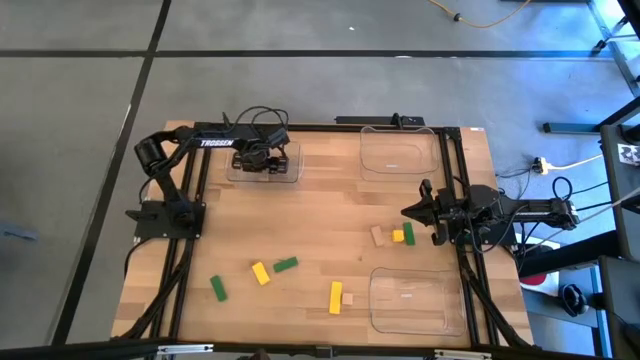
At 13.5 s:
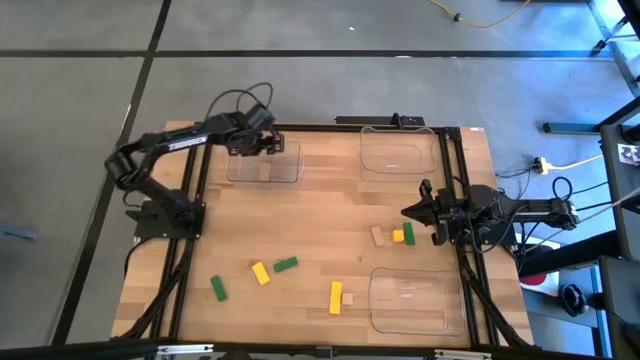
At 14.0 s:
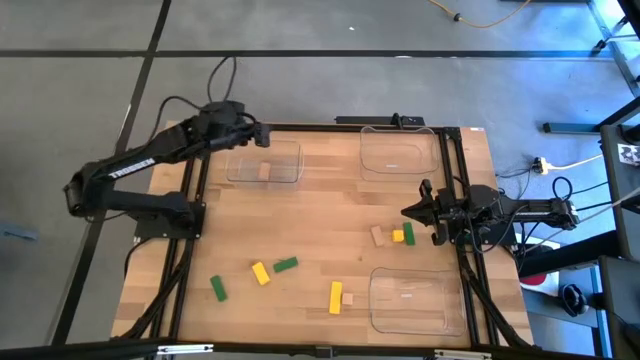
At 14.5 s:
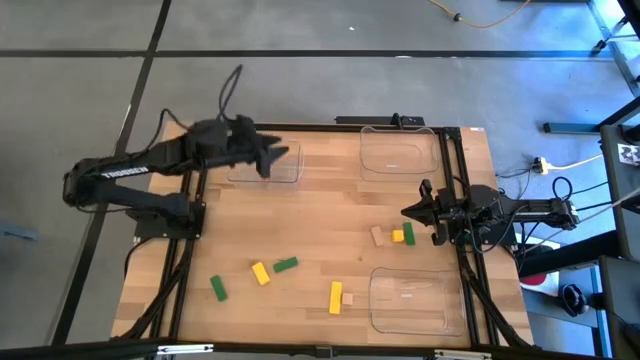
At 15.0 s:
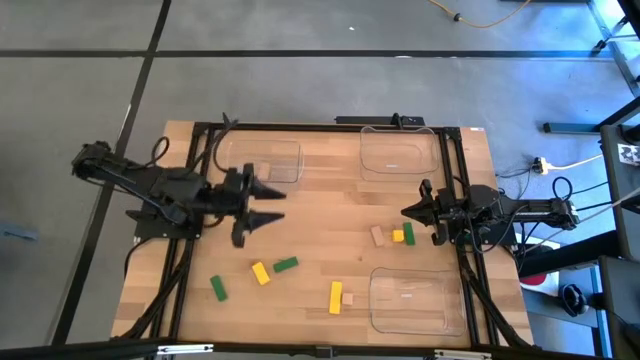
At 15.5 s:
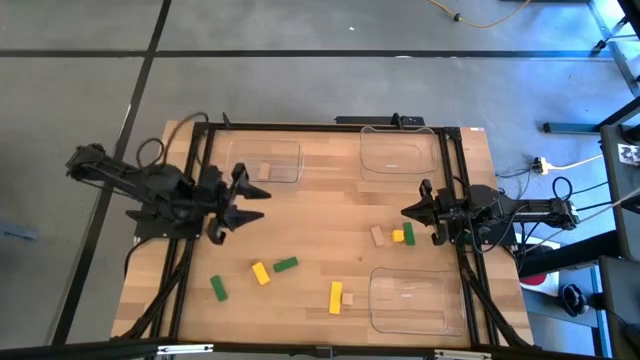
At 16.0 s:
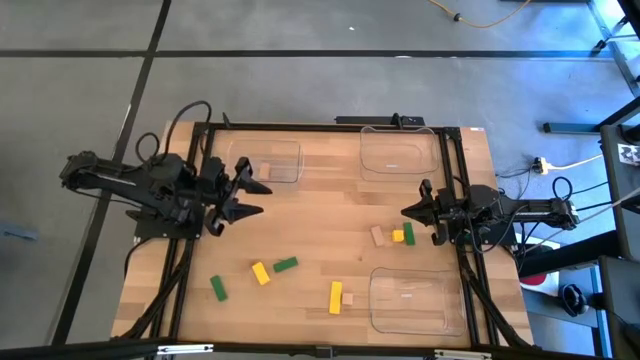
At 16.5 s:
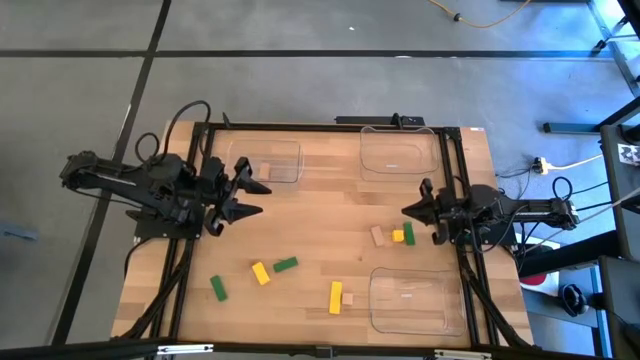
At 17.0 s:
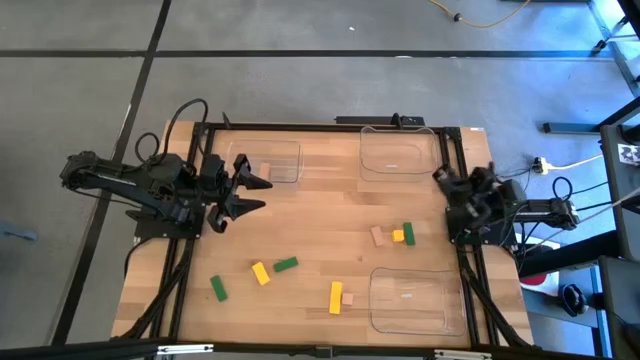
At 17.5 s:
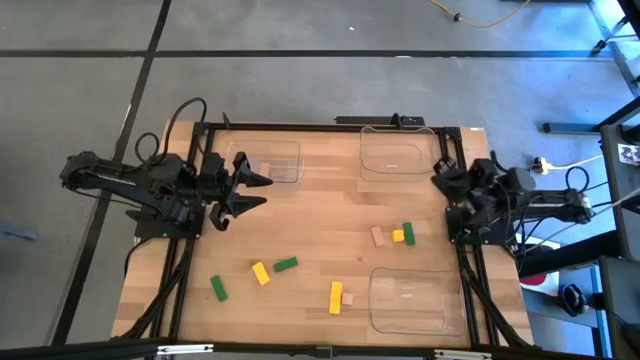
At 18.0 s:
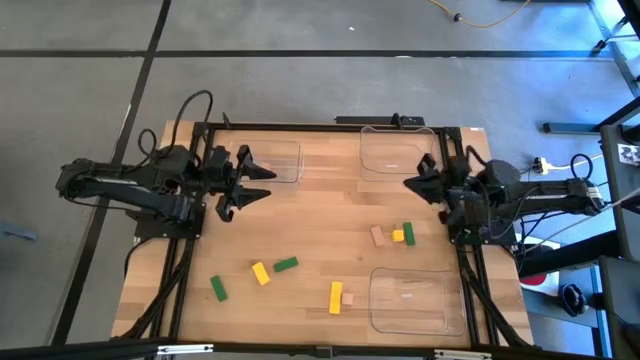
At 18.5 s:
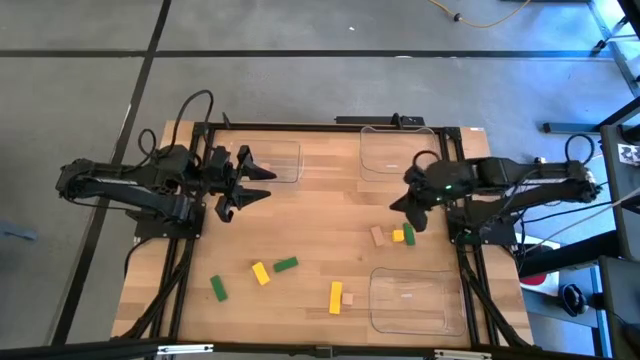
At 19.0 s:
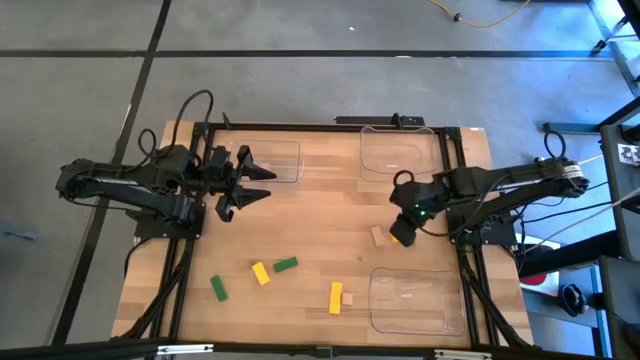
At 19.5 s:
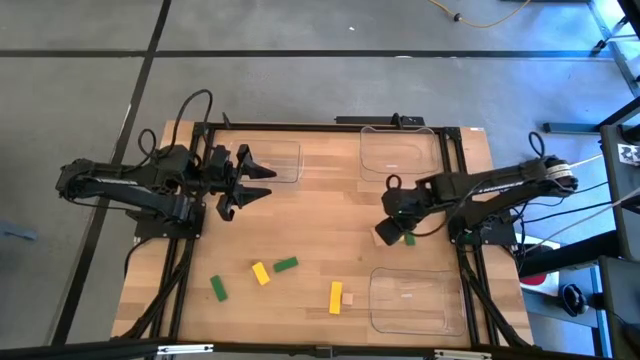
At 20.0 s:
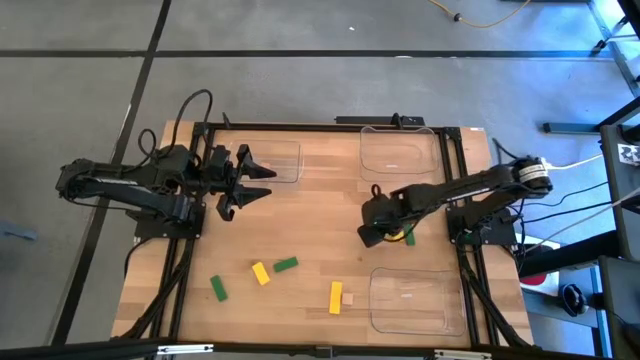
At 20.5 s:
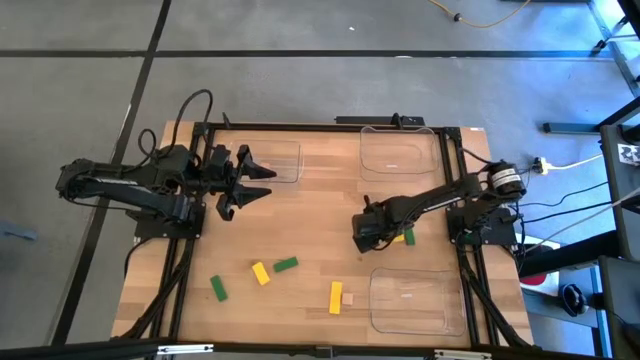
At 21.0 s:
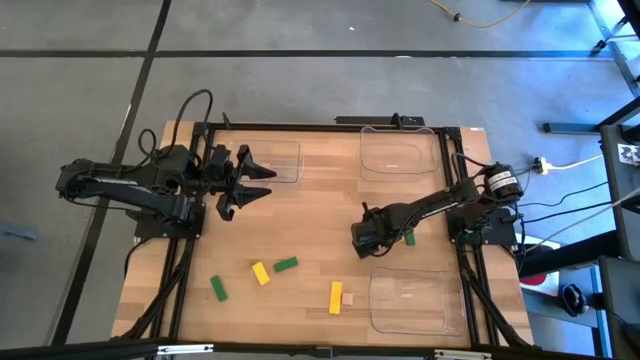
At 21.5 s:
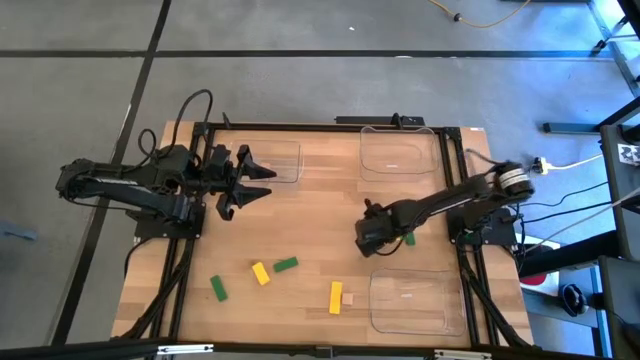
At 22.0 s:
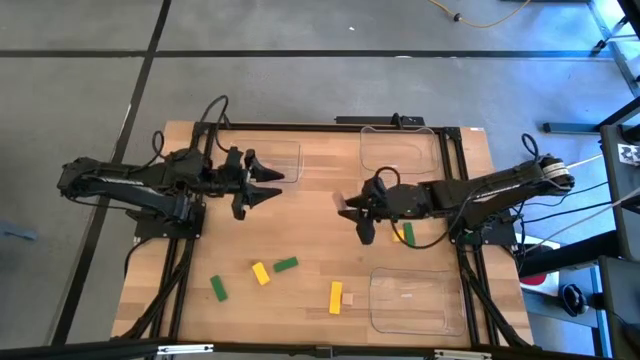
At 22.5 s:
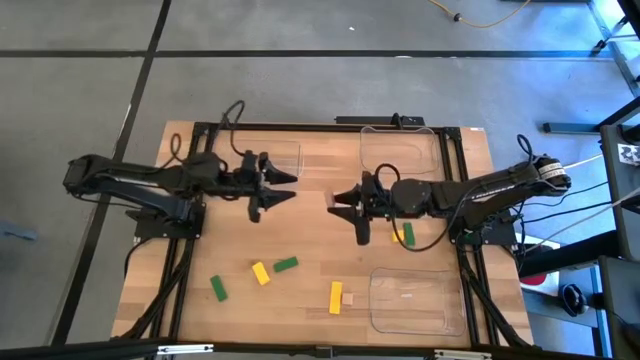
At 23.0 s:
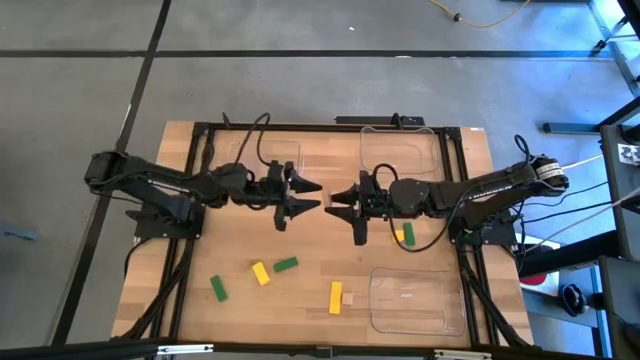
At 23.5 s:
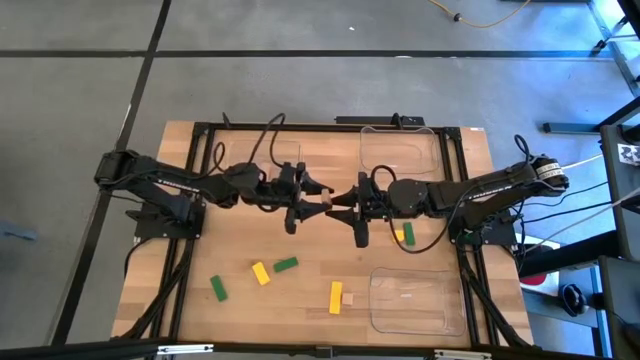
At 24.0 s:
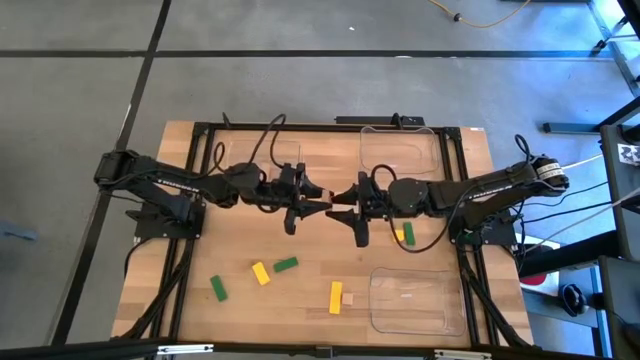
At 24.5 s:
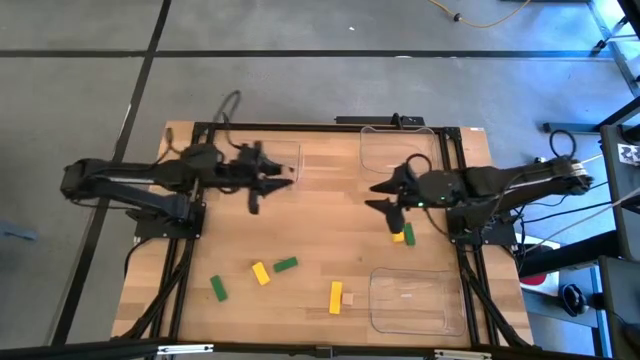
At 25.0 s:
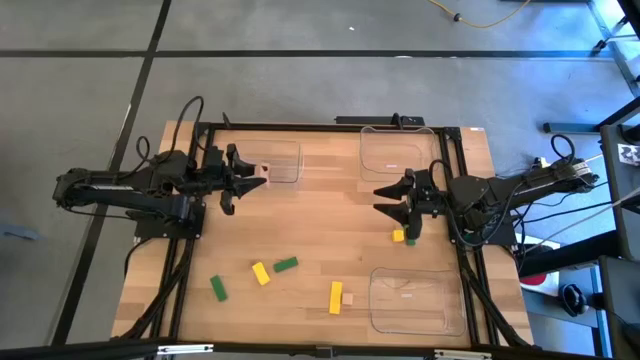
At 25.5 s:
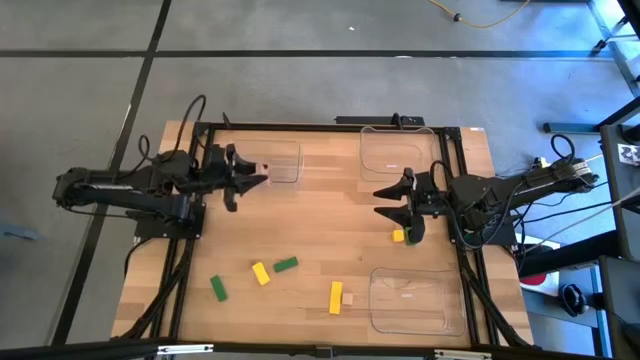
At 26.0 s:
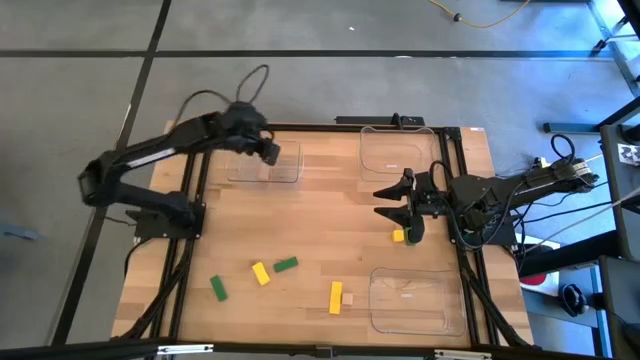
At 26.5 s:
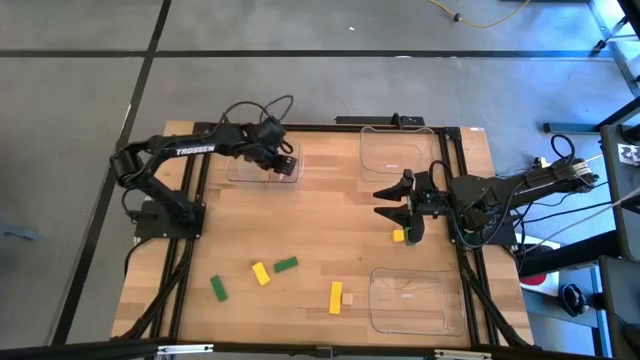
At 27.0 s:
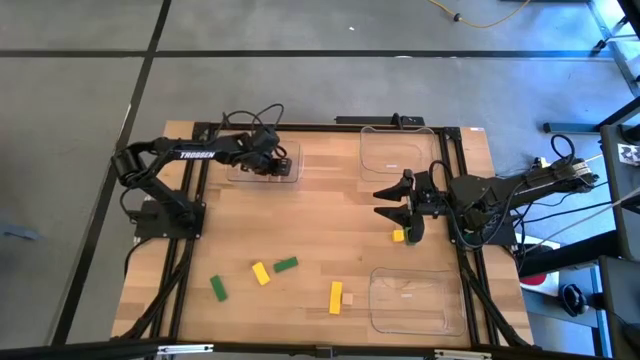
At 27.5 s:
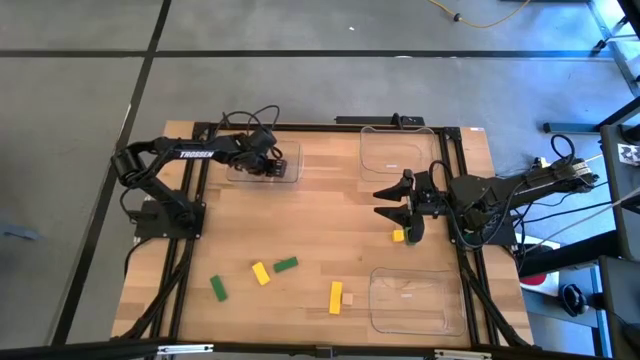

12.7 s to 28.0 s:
Task: Sort & place blocks by color
Put the top brown block into the top left transparent bin

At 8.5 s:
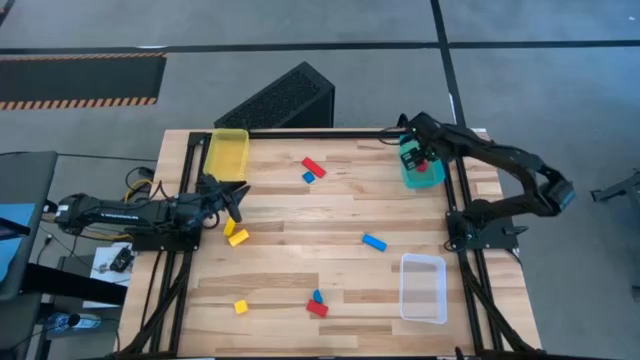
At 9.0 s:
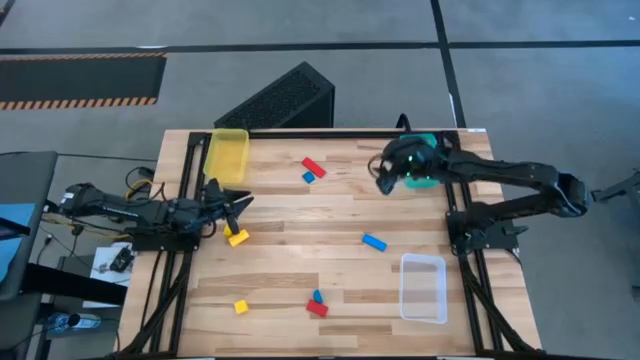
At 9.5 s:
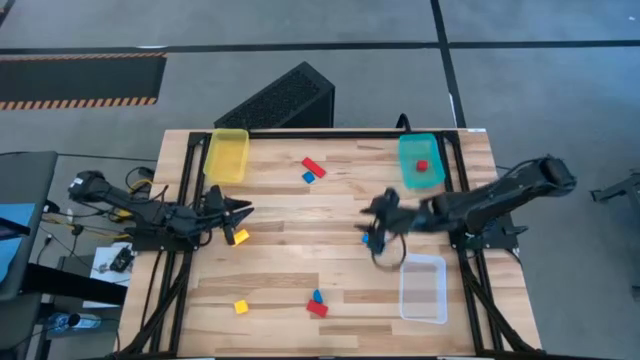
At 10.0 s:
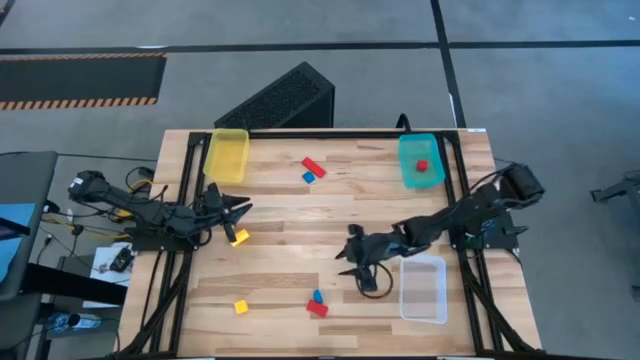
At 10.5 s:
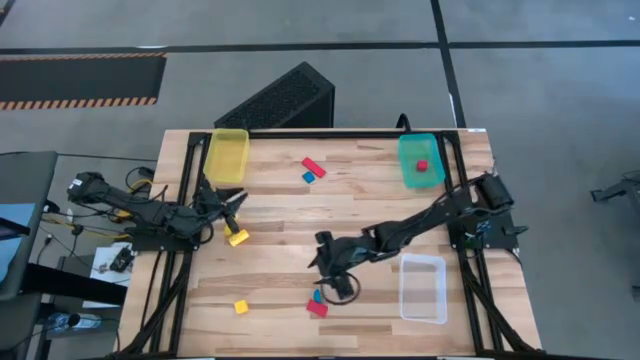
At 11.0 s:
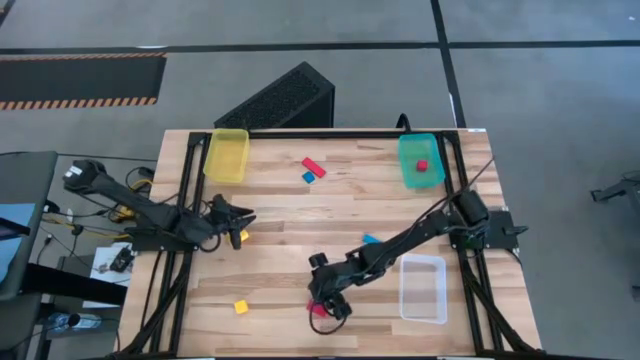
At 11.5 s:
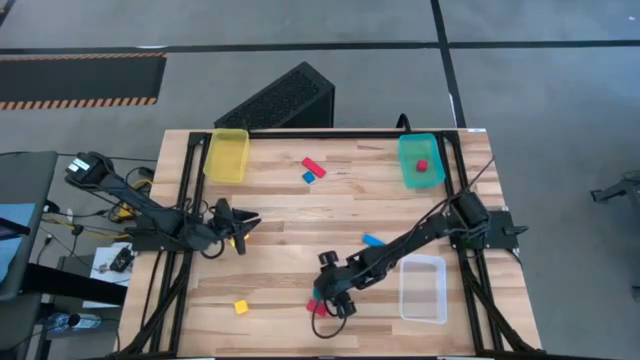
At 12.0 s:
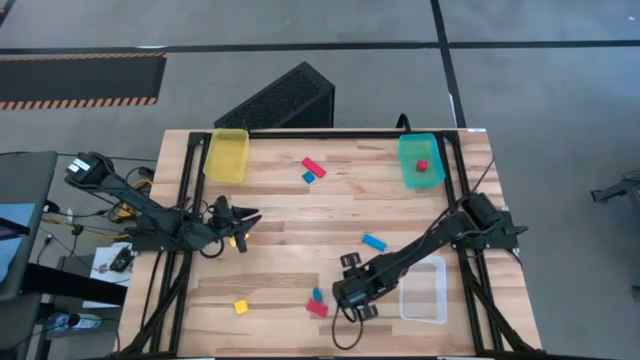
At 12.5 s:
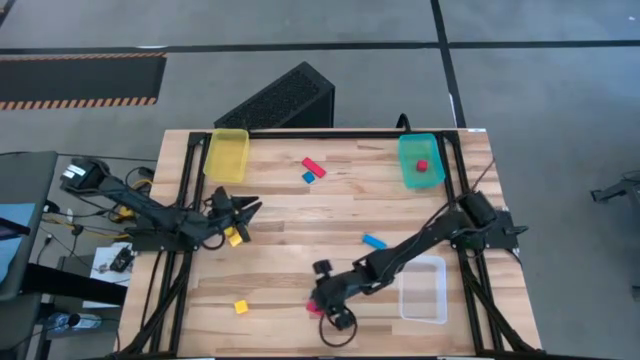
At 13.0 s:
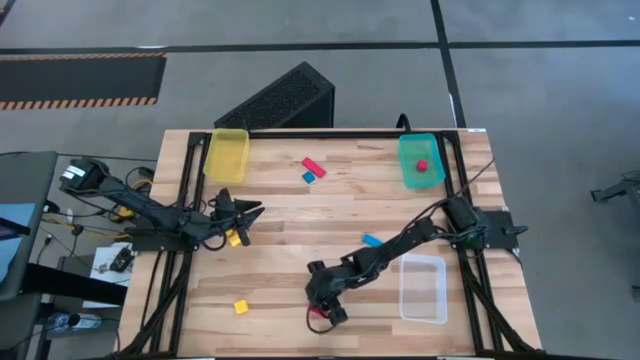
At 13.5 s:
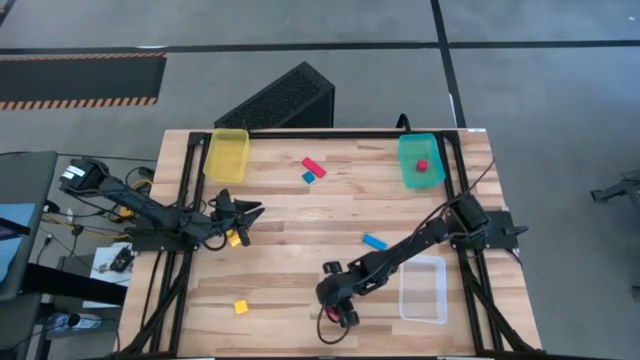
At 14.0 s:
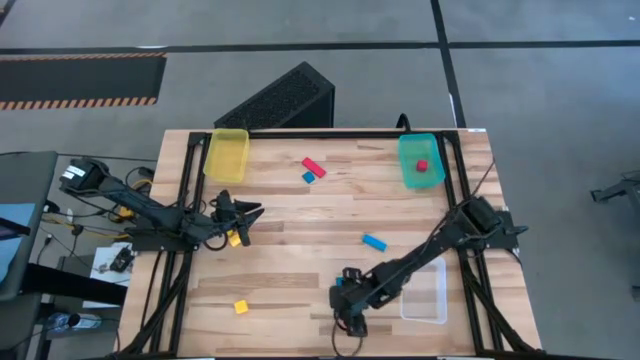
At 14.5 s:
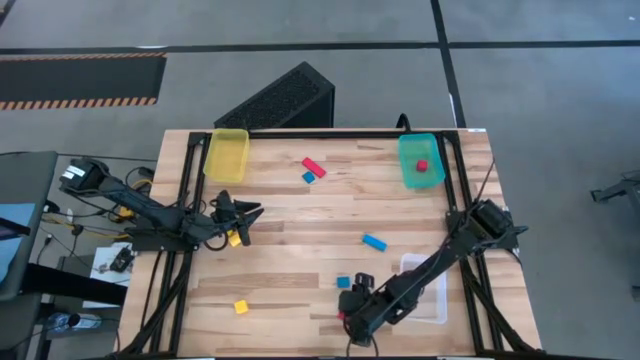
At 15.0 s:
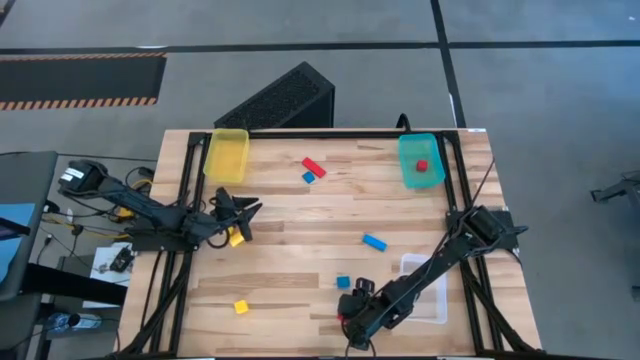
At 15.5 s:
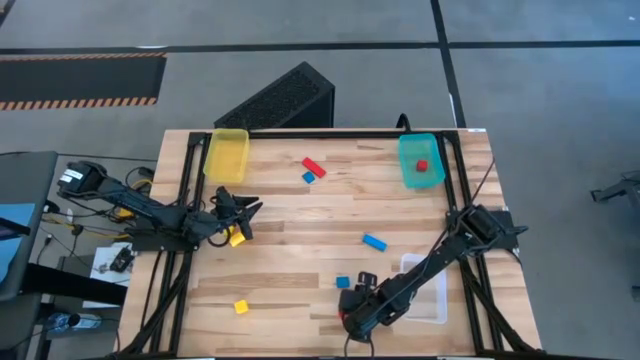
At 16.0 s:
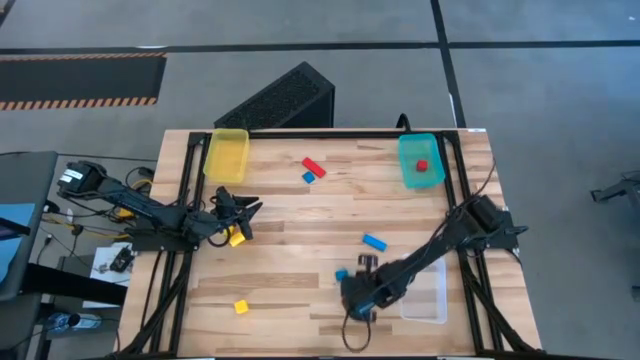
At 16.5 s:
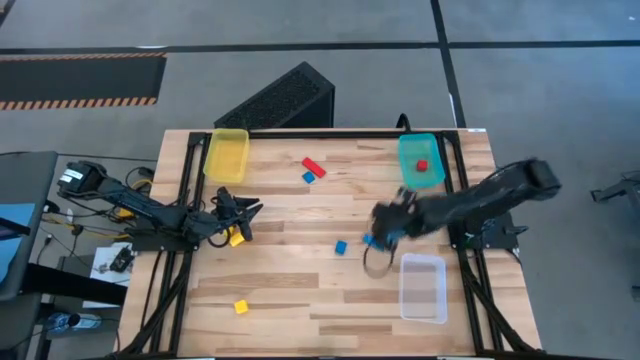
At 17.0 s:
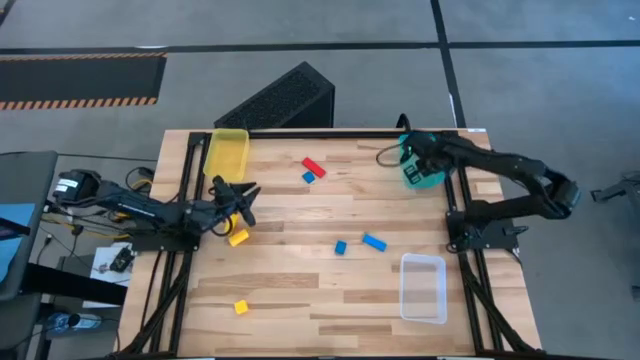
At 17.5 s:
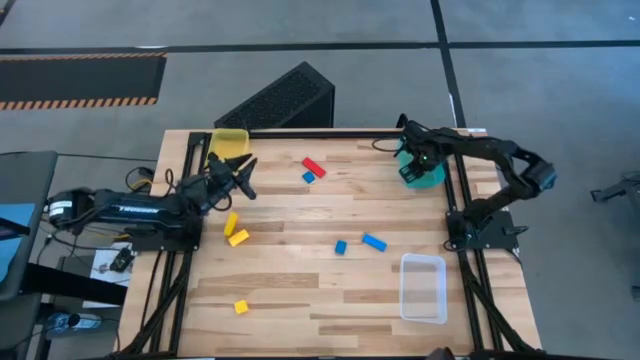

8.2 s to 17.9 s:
Task: Sort & place blocks by color
Put the bottom red block into the light blue bin
